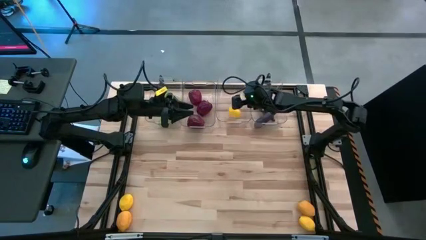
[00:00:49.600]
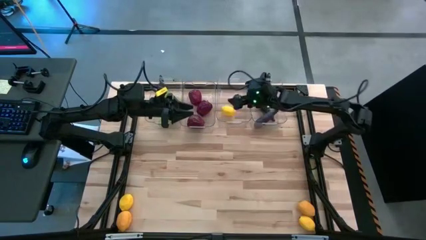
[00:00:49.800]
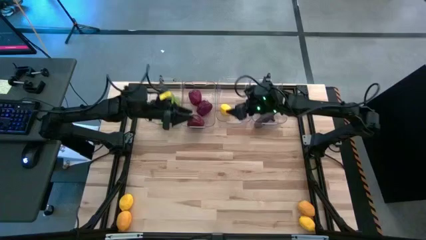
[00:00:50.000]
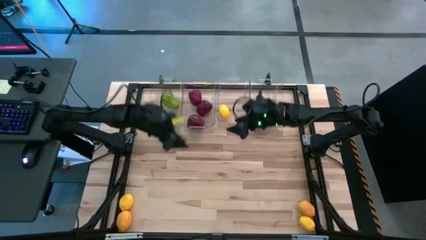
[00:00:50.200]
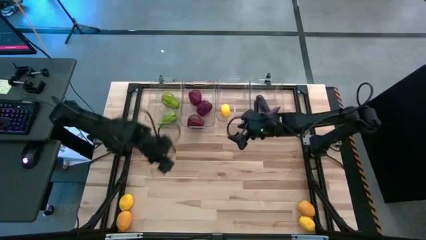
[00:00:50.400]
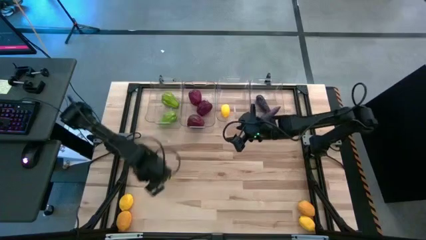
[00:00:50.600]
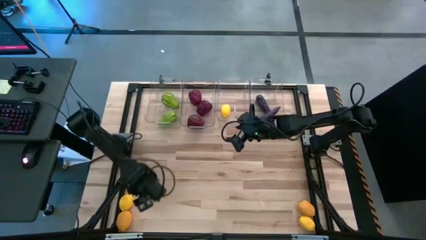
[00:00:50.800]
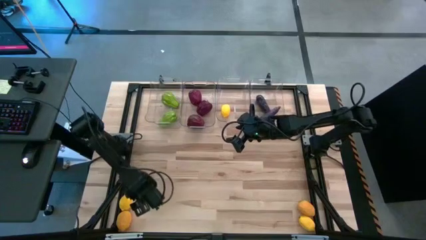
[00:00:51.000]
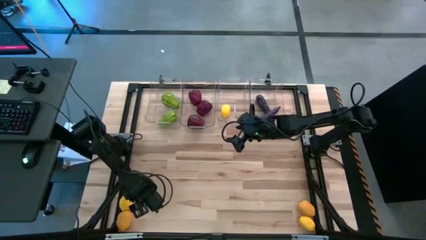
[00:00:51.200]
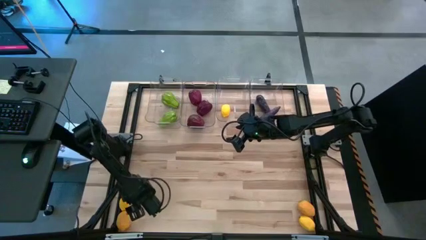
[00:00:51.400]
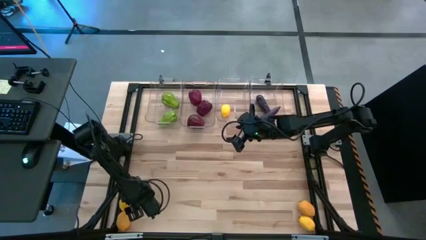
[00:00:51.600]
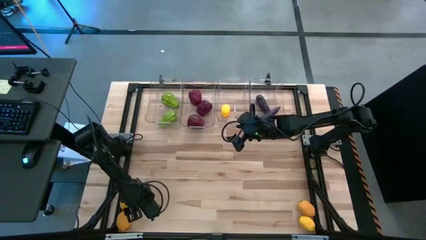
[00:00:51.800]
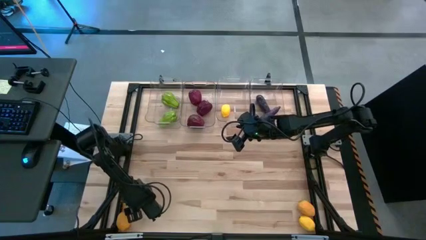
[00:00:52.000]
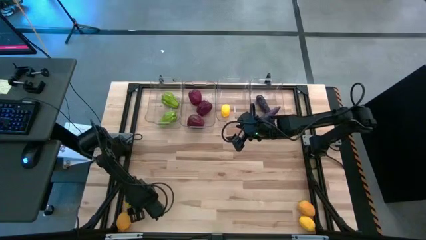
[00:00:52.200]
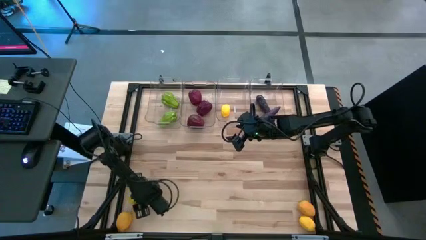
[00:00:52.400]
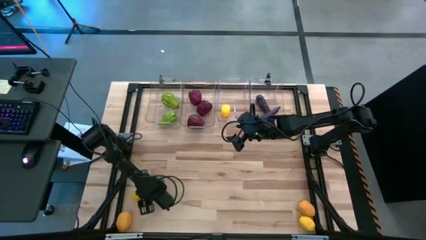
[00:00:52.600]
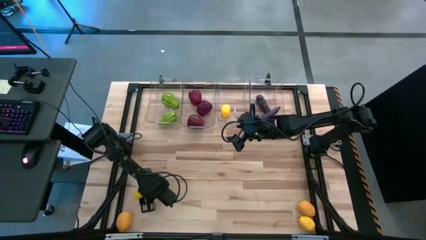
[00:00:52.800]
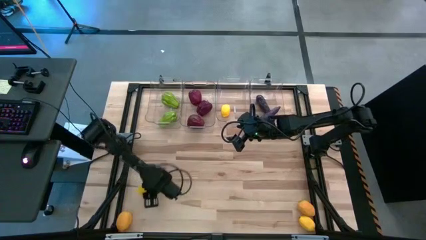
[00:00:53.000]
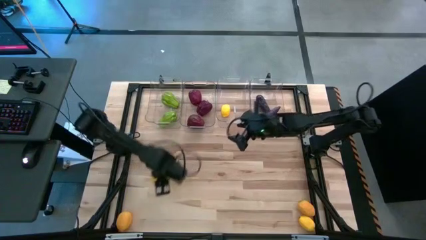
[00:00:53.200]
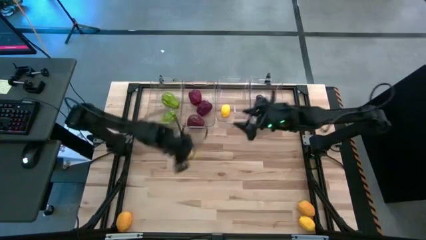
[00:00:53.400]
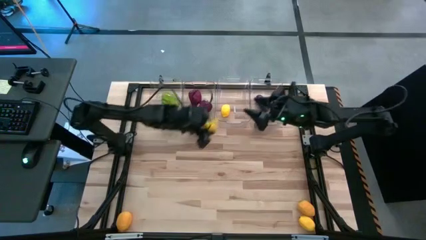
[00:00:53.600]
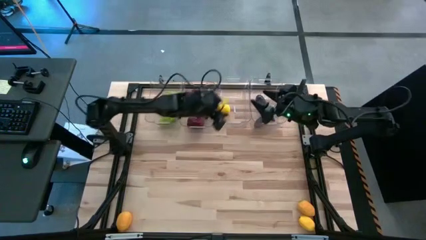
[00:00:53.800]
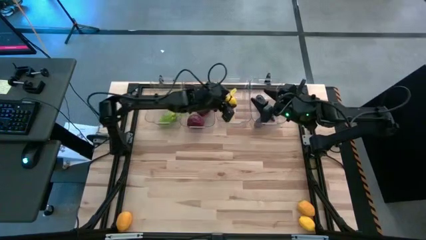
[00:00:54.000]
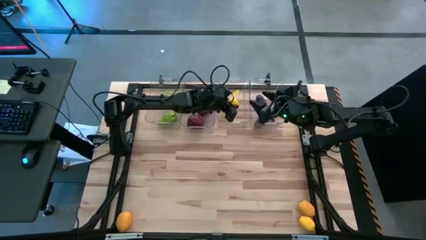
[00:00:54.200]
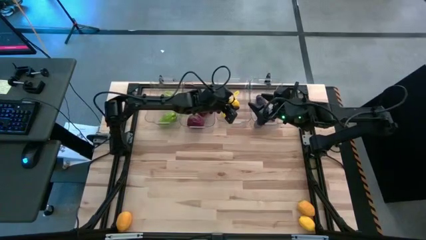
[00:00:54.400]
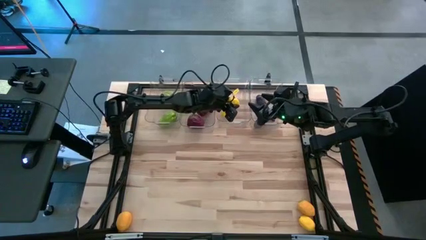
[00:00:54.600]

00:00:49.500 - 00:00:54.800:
Task: Sort produce into baskets
Put the yellow lemon into the middle right transparent bin

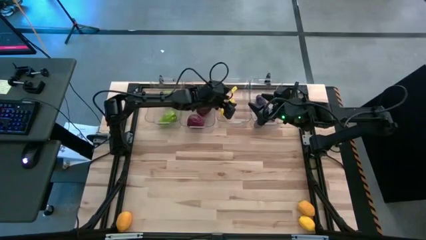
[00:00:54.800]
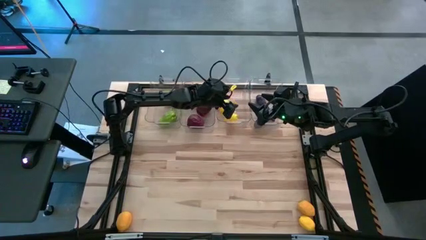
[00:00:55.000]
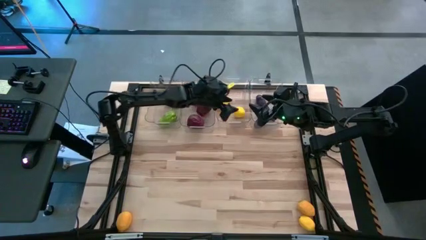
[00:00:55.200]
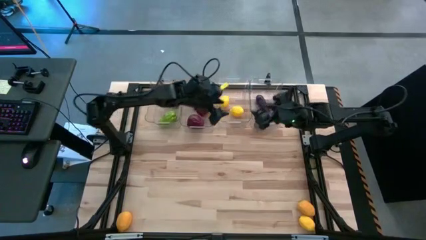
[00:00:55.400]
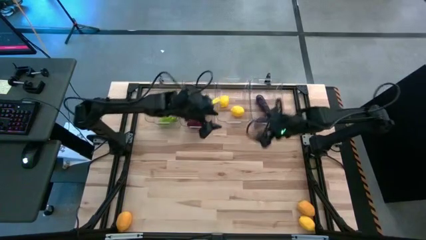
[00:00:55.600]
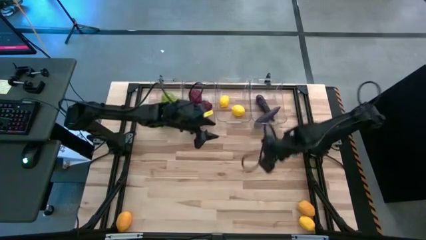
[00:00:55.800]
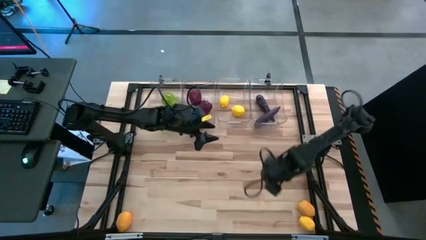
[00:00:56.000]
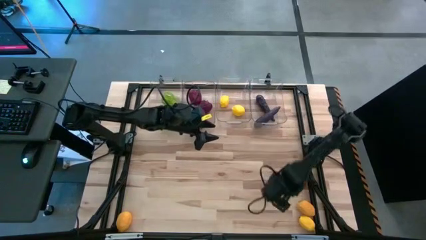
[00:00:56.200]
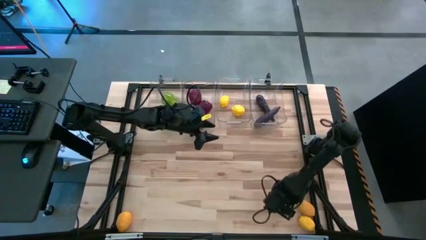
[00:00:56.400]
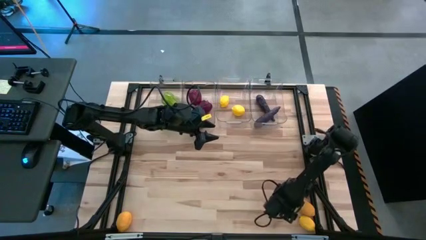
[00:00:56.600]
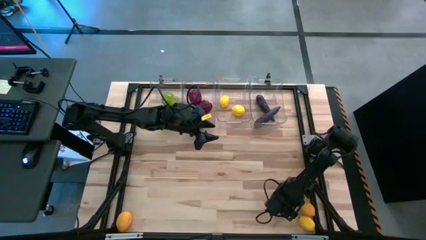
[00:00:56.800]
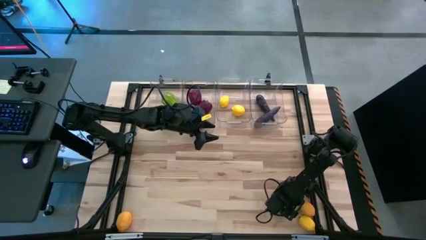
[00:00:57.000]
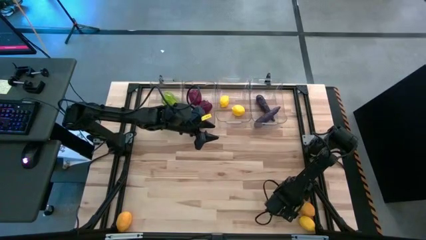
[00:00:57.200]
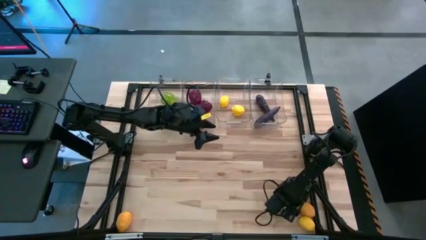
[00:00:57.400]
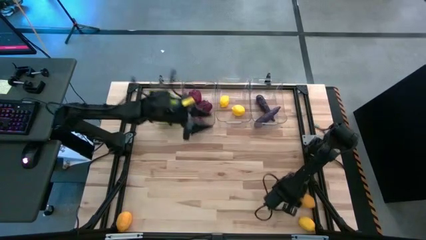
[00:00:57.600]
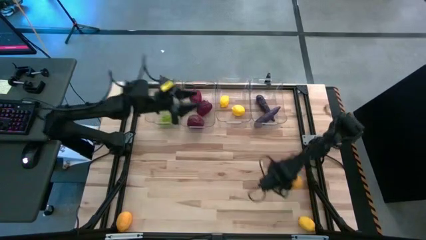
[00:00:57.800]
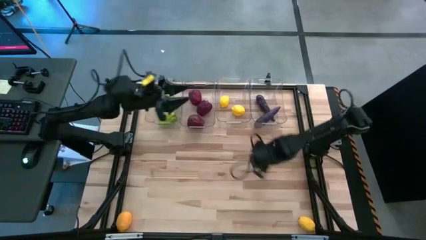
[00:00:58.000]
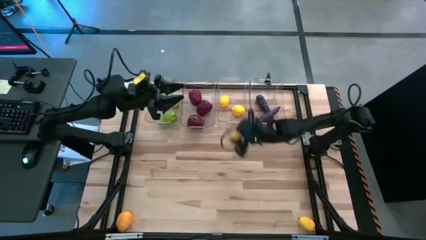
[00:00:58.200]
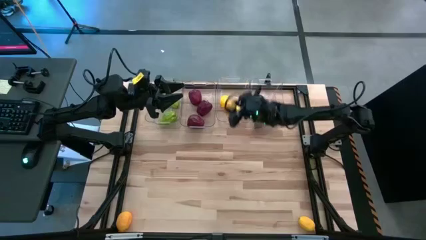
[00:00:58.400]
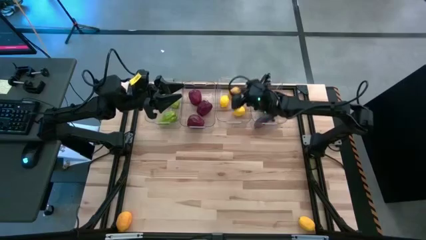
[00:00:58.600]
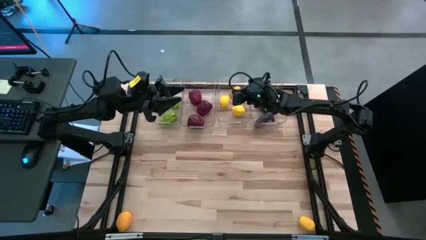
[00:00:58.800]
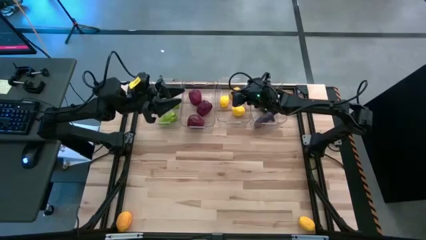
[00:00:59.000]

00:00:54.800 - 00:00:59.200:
Put the yellow lemon into the middle right transparent bin

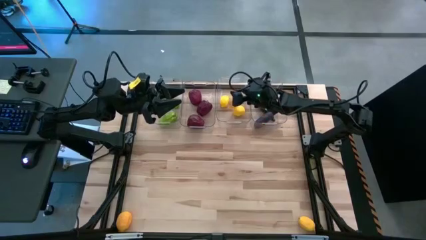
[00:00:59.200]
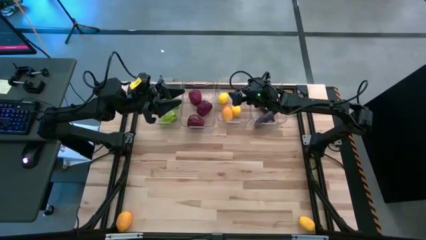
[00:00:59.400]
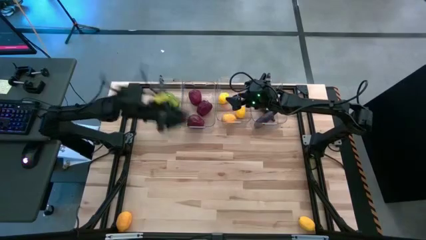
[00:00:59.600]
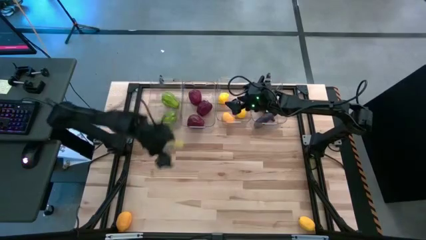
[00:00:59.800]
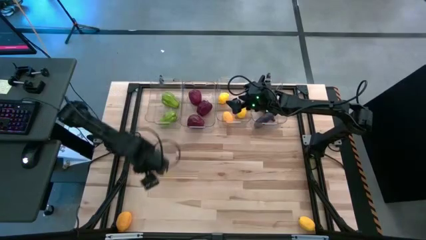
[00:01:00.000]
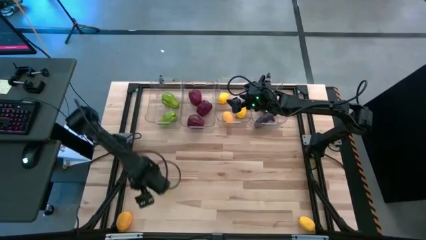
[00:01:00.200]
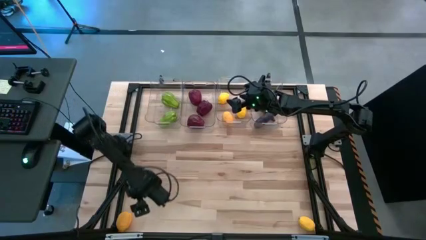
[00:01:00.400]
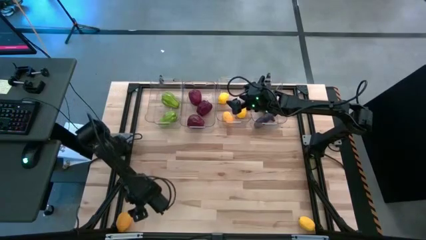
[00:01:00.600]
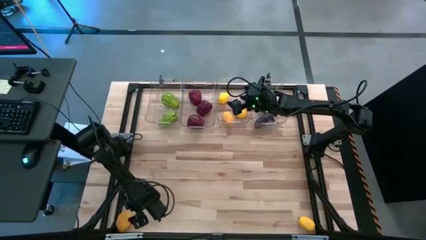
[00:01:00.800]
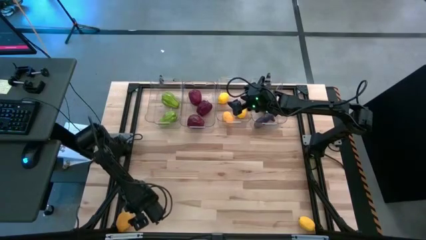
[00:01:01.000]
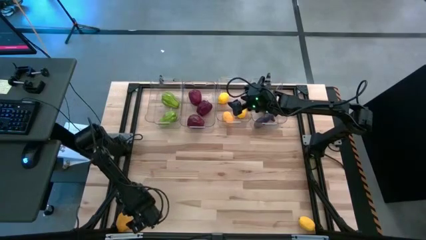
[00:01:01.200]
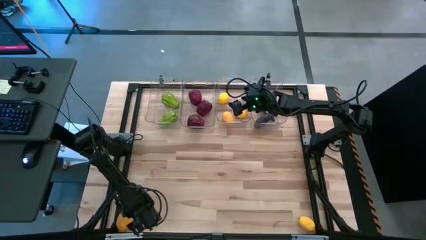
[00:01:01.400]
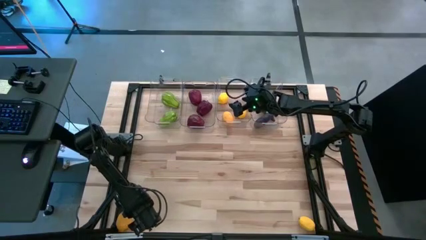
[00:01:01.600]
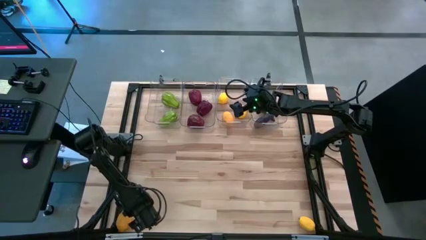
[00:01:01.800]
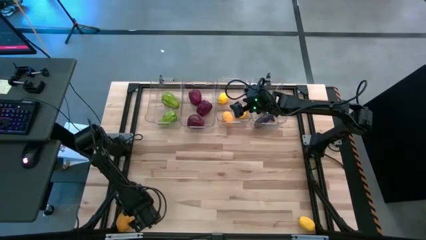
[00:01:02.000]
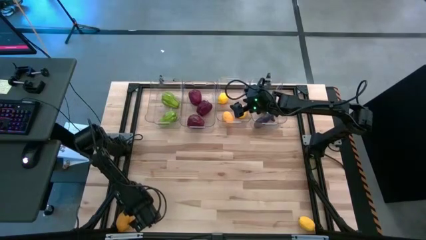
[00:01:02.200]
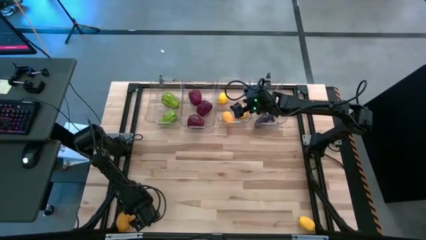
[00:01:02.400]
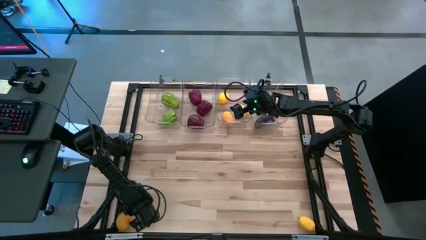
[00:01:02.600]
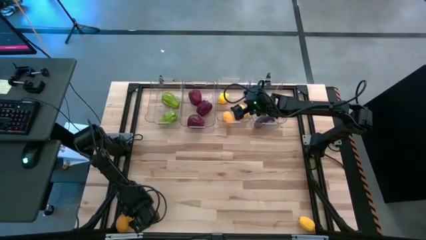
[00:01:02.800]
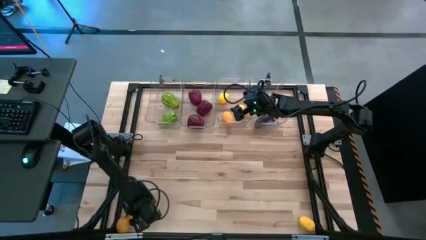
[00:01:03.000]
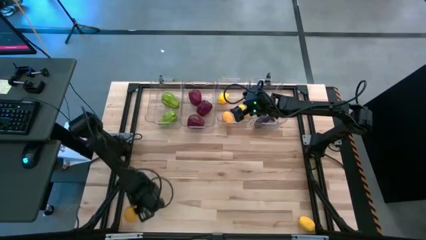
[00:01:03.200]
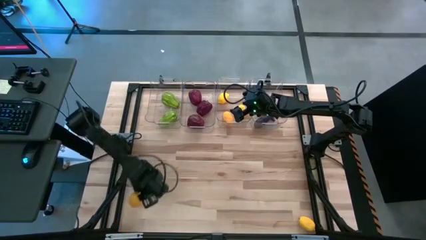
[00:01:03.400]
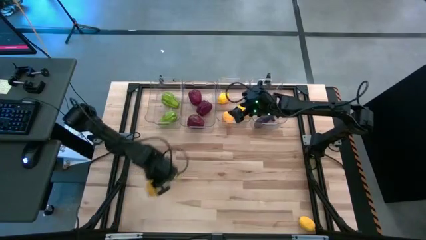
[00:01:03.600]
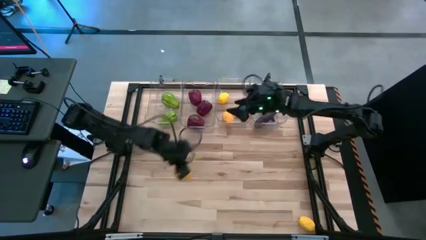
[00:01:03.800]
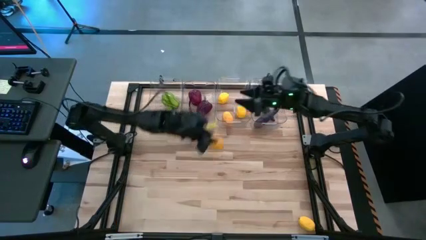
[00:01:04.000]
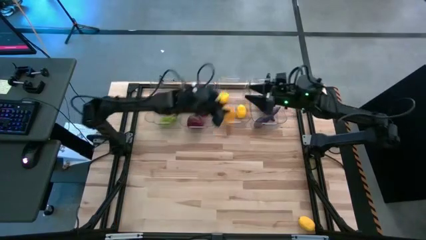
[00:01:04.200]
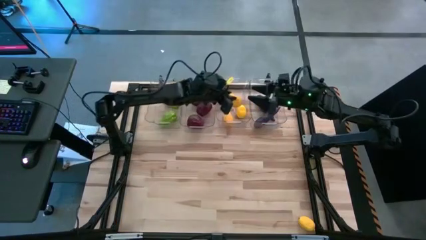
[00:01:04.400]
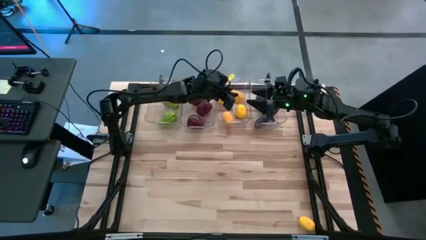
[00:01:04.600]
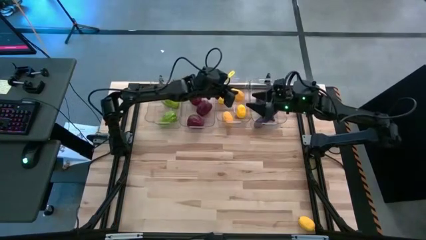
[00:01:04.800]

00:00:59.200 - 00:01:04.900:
Put the yellow lemon into the middle right transparent bin

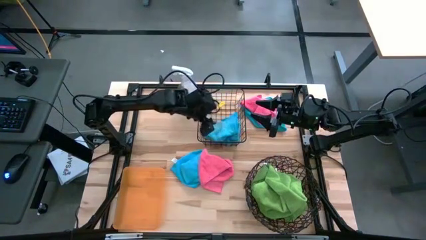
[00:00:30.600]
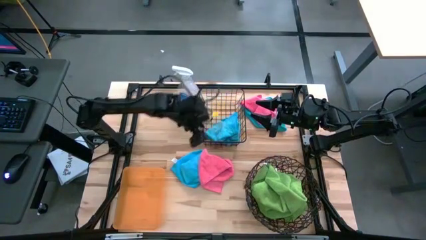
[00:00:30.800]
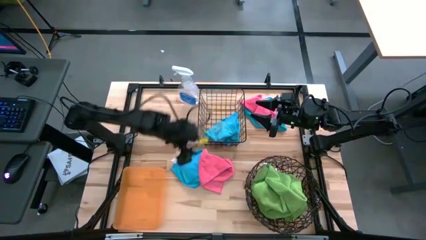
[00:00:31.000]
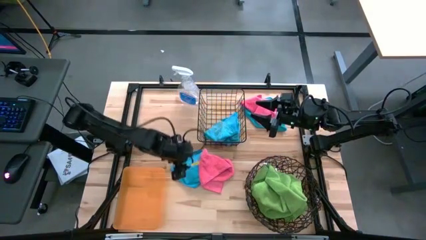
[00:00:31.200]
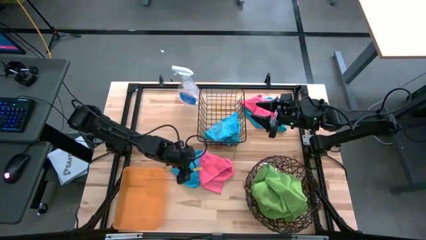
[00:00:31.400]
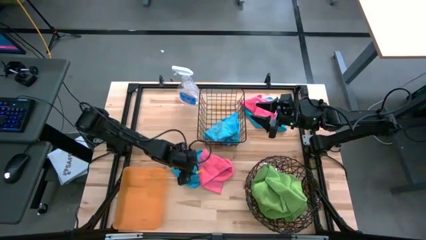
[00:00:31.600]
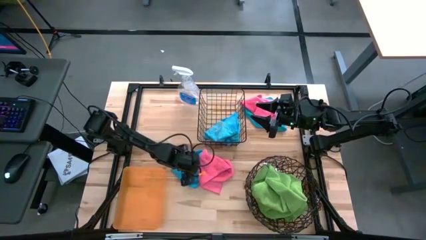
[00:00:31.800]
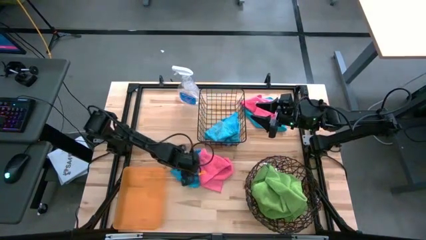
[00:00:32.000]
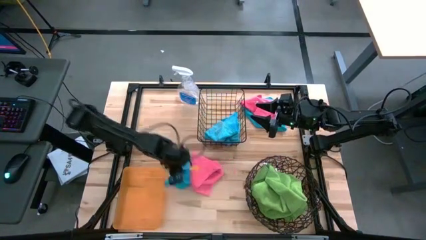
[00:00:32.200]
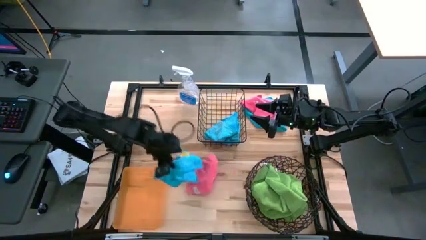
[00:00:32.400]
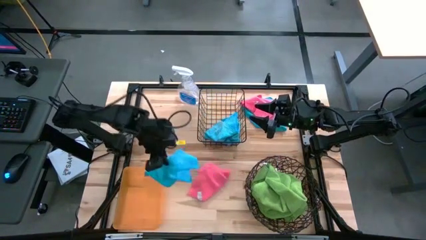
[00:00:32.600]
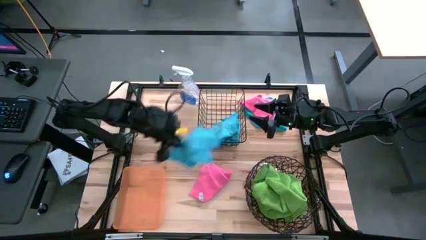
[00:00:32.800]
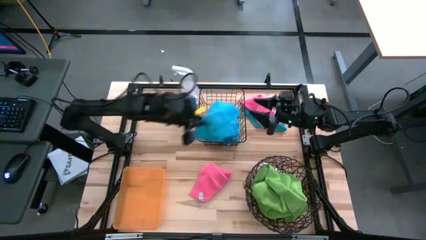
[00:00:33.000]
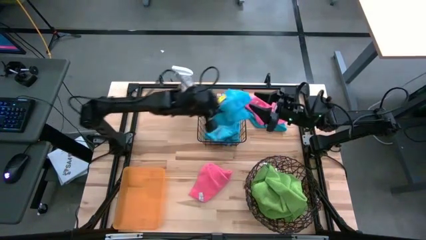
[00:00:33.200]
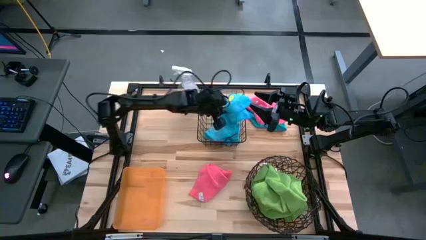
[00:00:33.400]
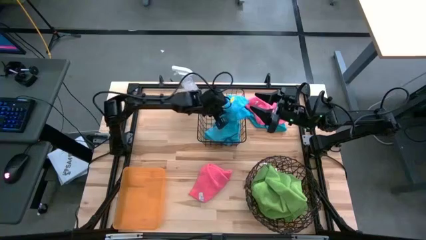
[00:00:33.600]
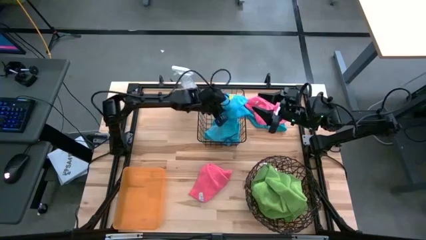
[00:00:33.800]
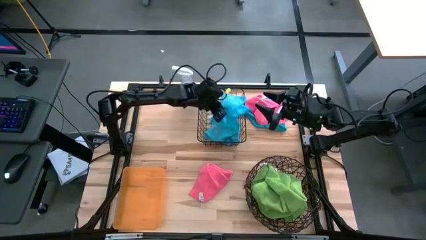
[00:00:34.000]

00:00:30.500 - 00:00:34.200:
Task: Sort microfiber towel by color & place in baskets
Put the left blue towel into the wire basket
